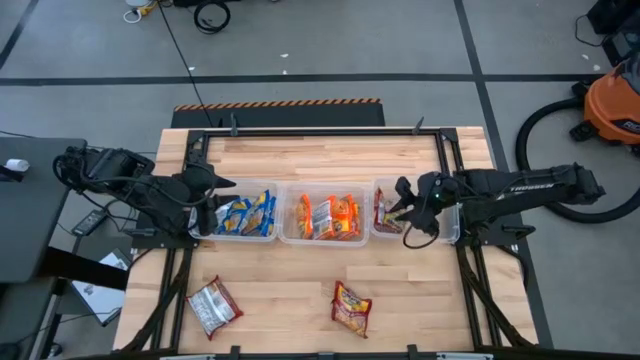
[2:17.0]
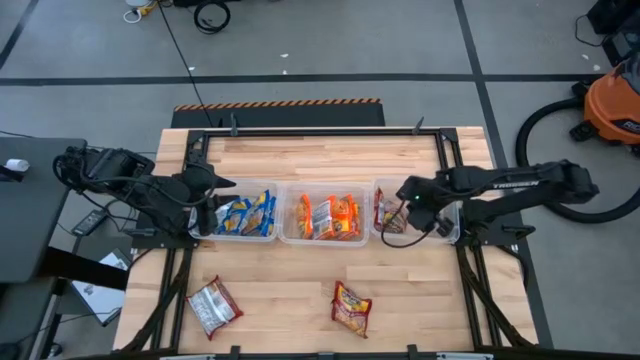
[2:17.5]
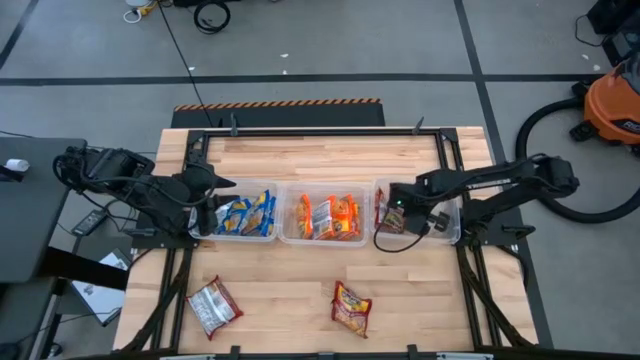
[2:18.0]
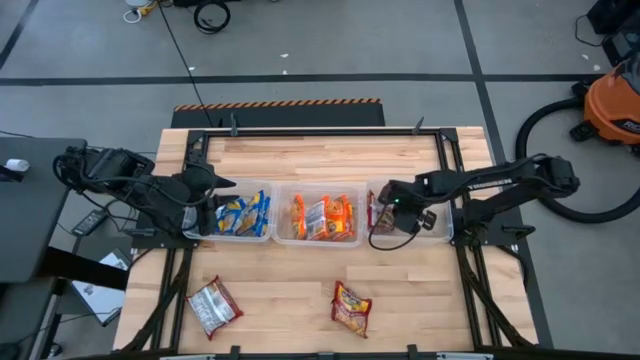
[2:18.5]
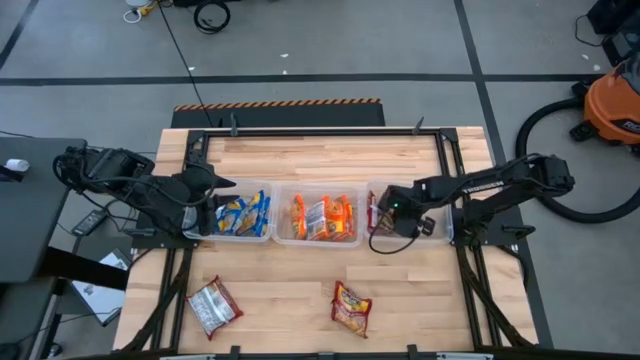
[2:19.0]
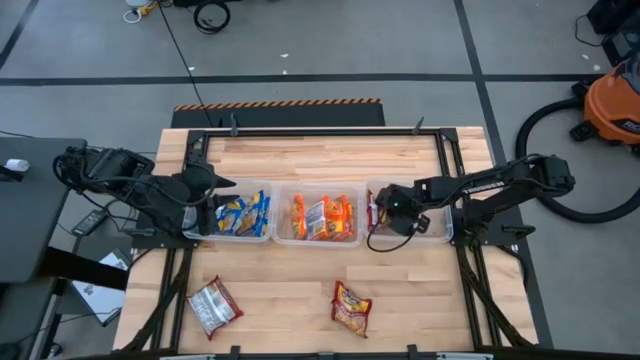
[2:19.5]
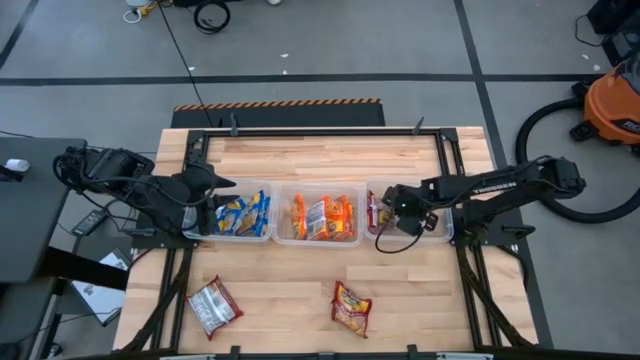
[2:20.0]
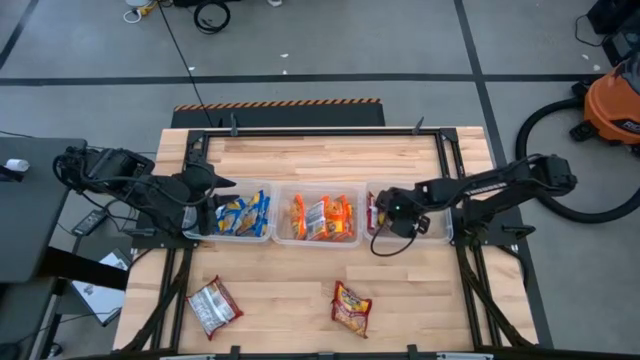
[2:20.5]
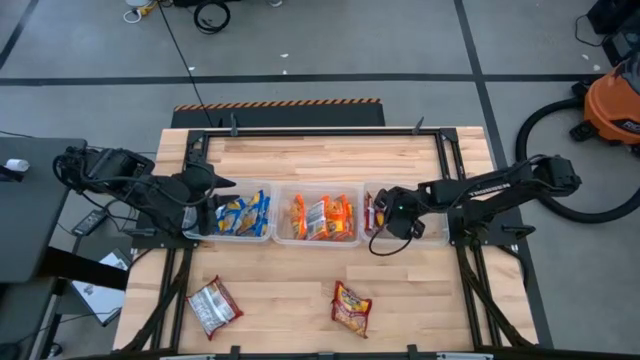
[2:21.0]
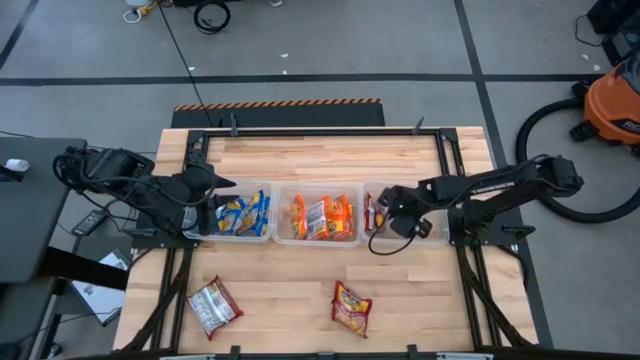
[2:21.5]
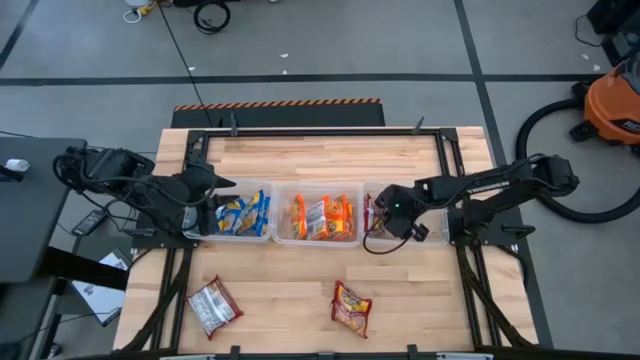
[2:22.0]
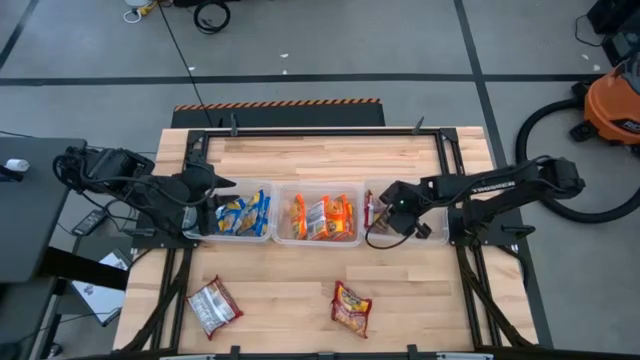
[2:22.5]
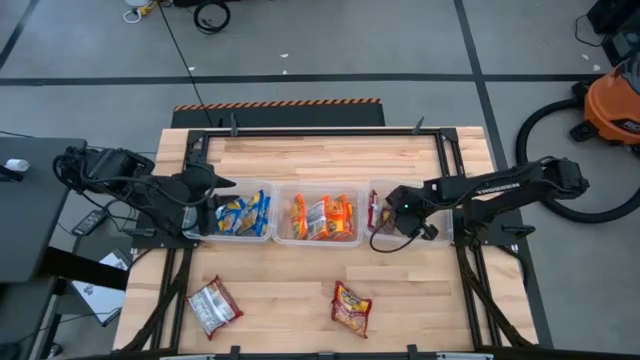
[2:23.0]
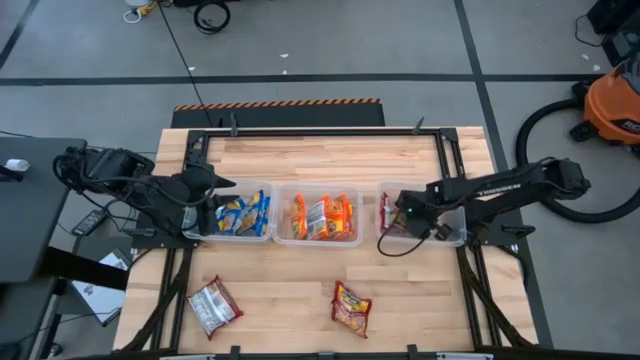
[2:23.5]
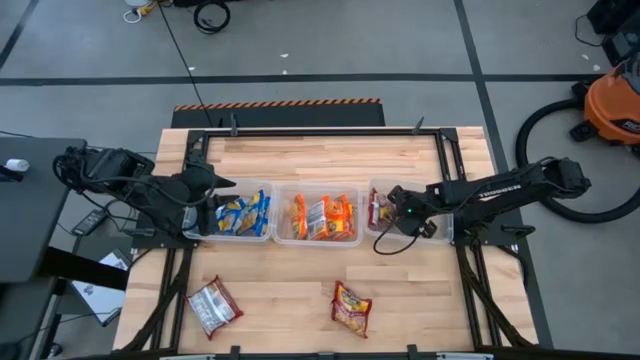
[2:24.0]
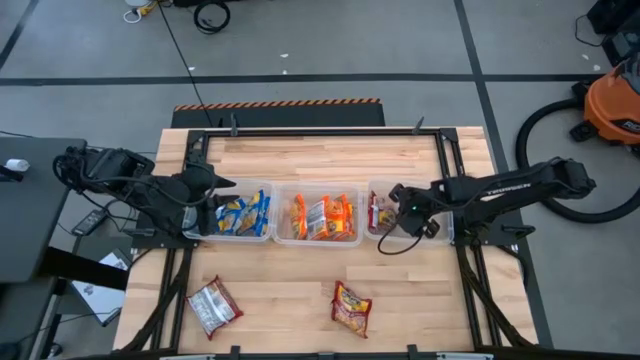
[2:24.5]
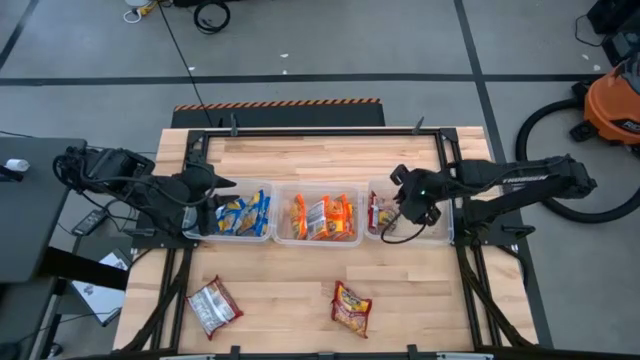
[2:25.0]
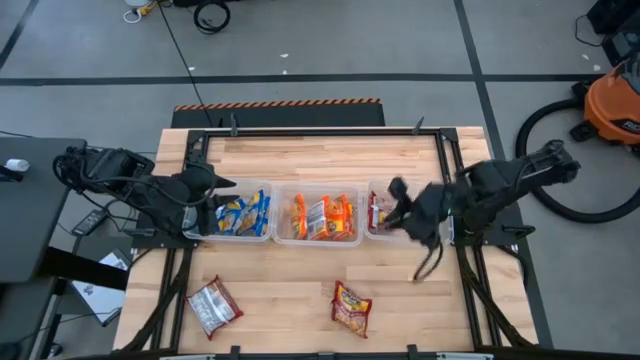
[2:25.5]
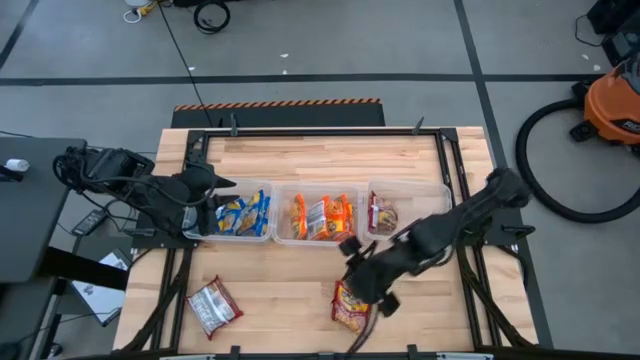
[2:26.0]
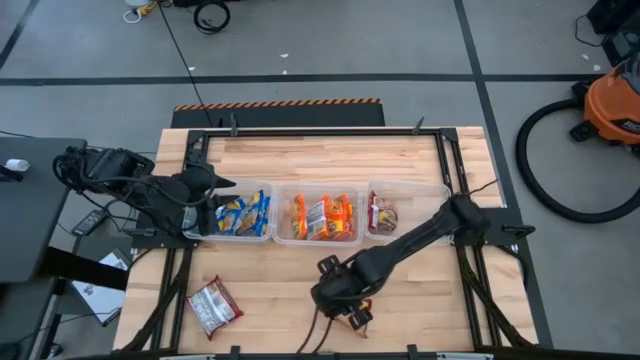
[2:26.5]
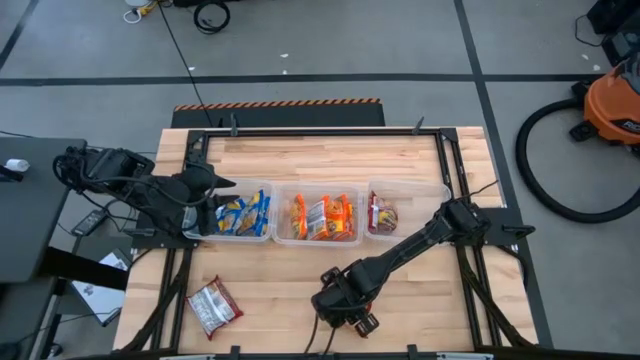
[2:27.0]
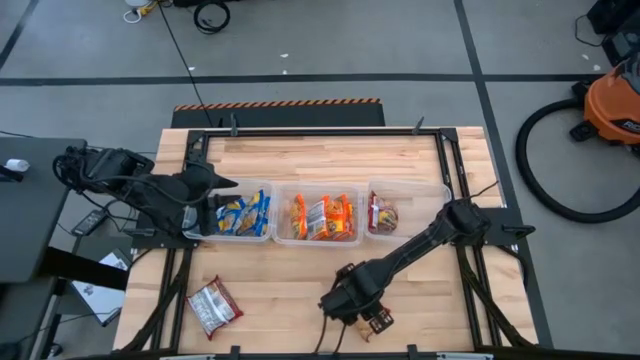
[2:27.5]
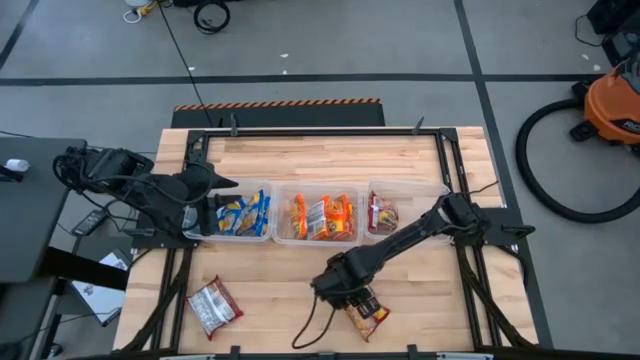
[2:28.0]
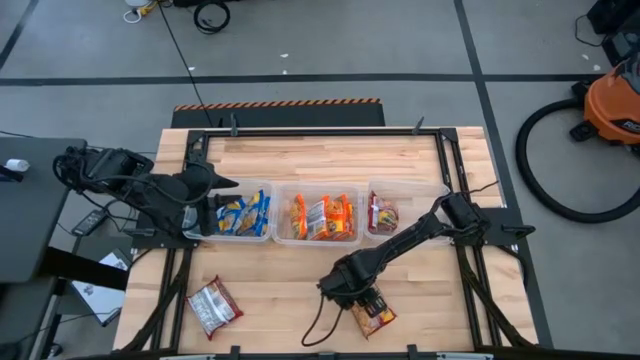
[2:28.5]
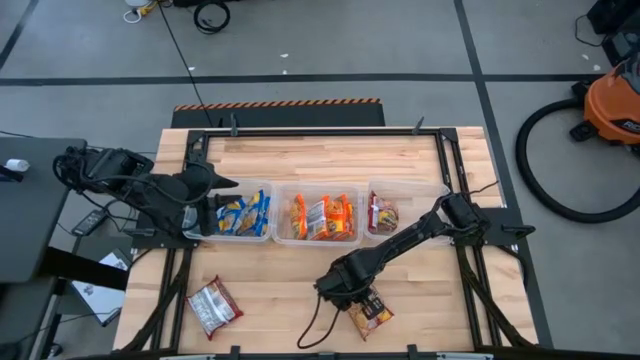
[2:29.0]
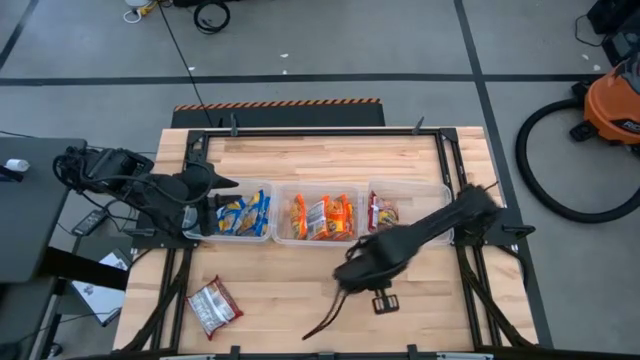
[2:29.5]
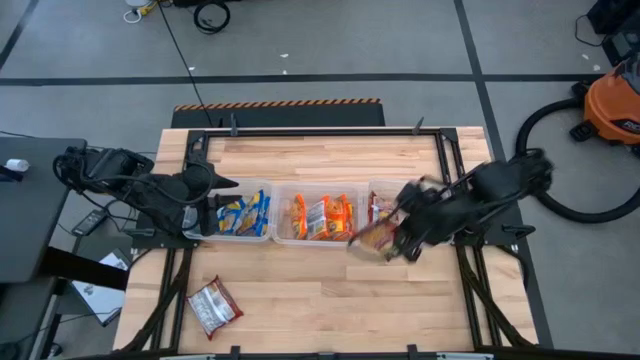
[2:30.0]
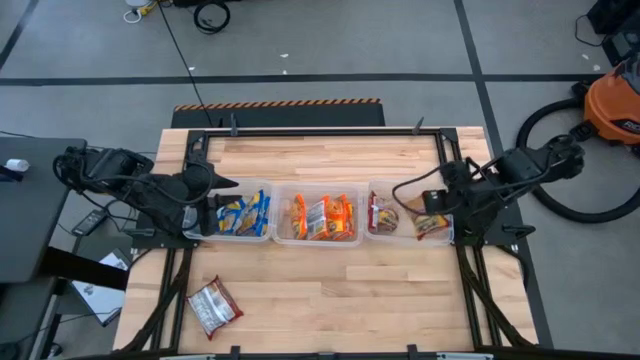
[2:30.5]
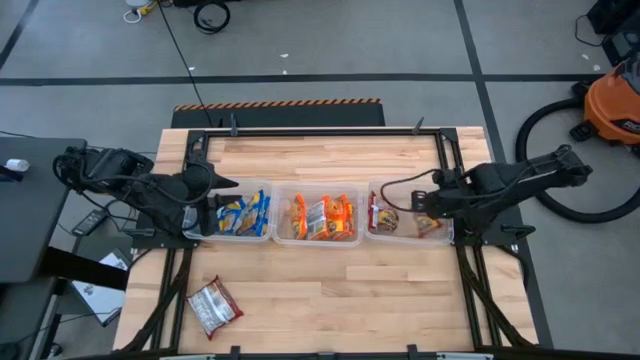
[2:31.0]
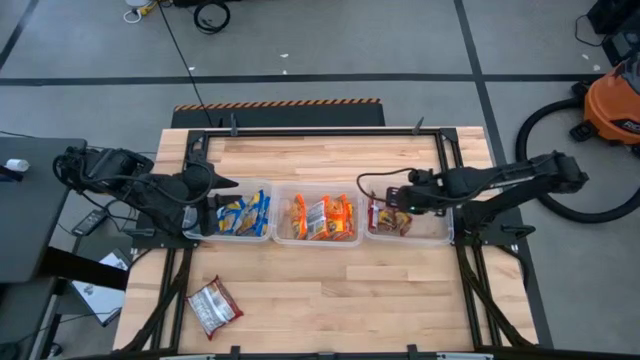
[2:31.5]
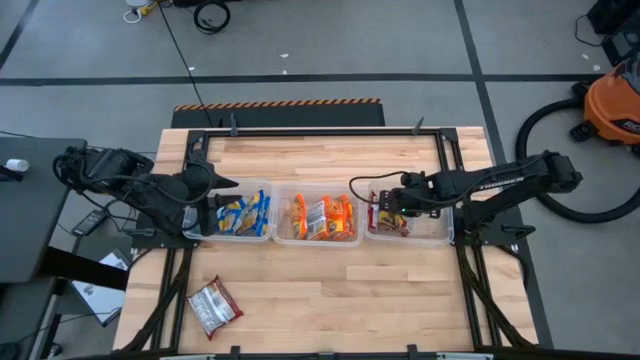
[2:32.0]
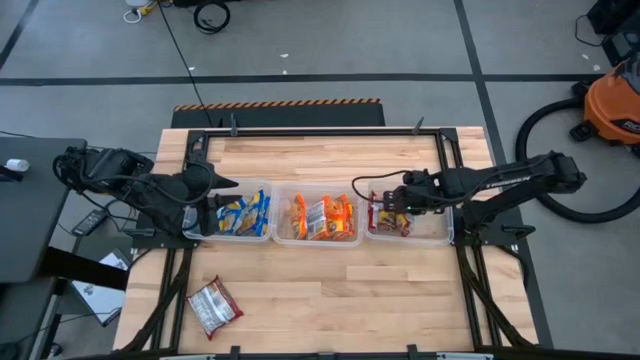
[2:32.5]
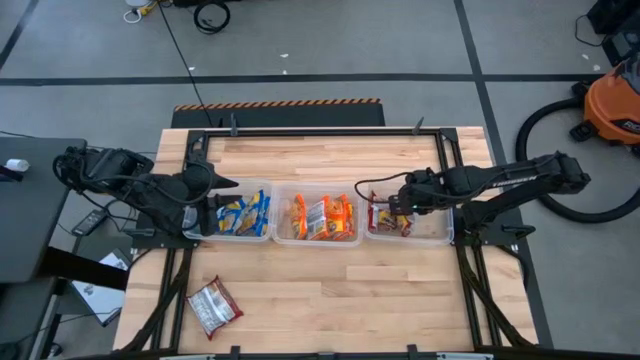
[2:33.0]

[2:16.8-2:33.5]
Task: Sort Maruchan noodles
Put the red noodle pack into the right transparent bin

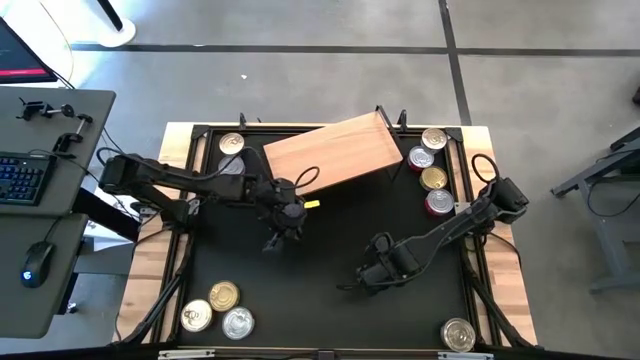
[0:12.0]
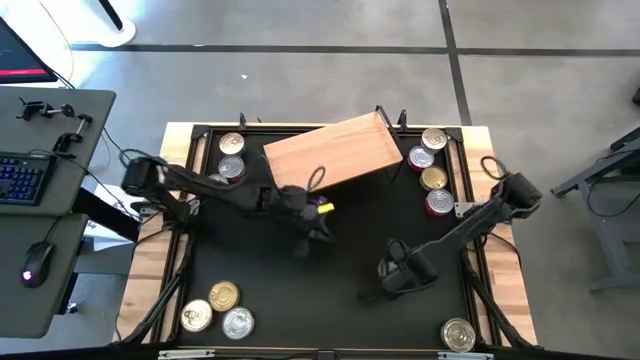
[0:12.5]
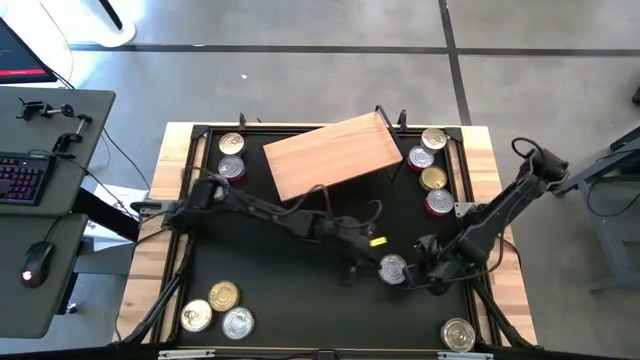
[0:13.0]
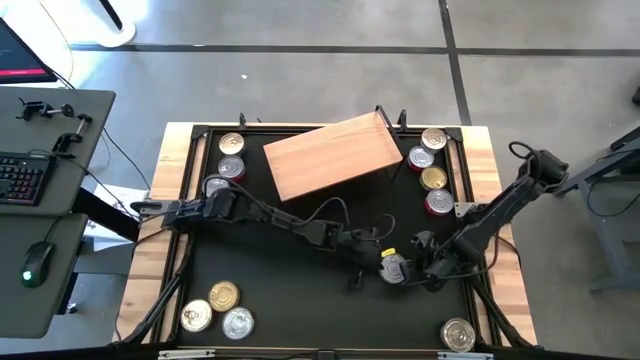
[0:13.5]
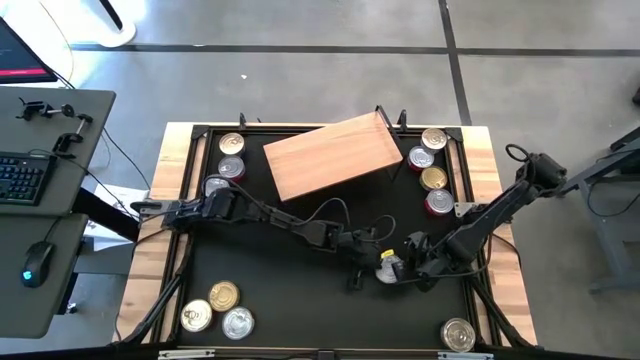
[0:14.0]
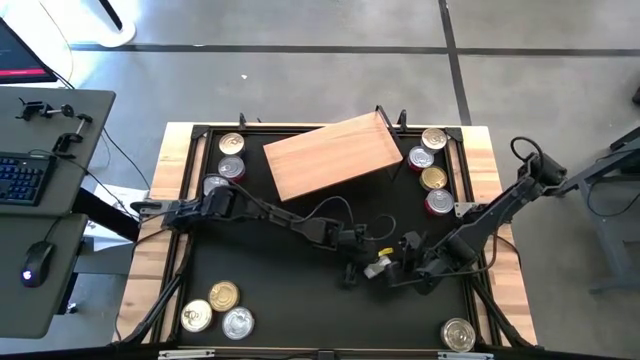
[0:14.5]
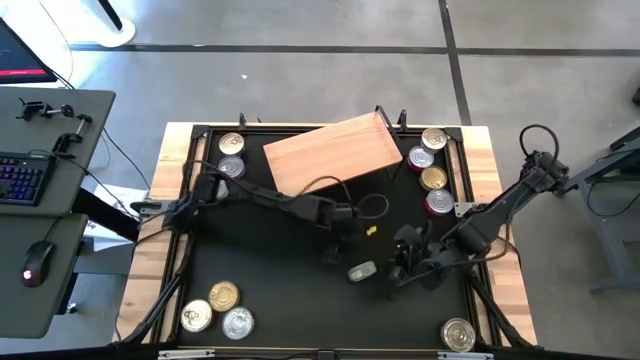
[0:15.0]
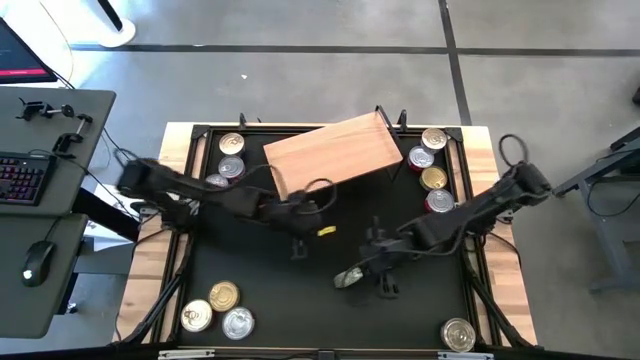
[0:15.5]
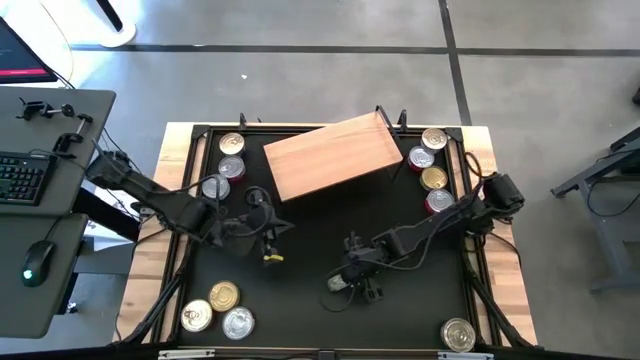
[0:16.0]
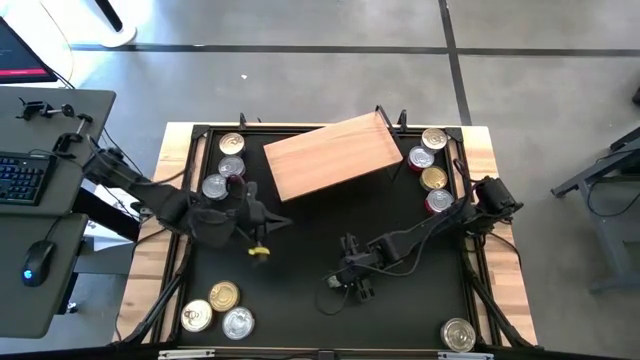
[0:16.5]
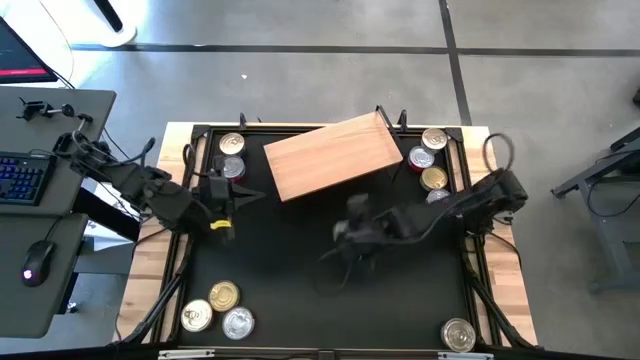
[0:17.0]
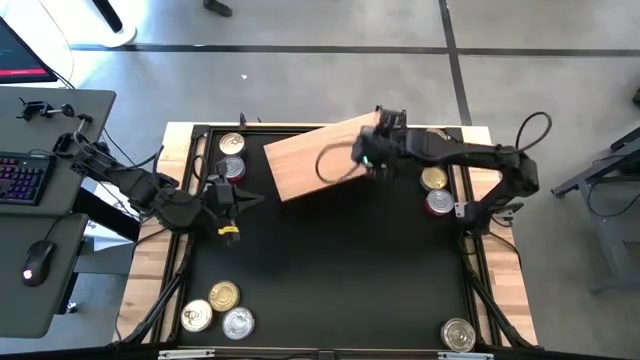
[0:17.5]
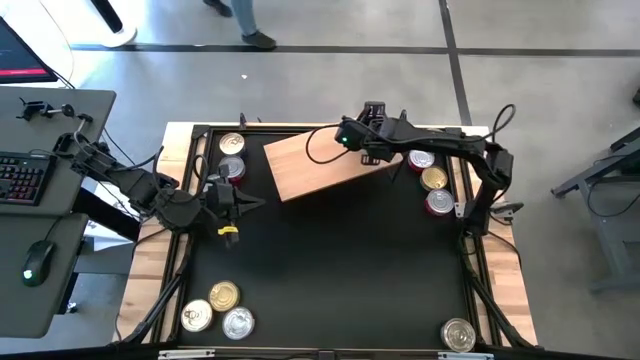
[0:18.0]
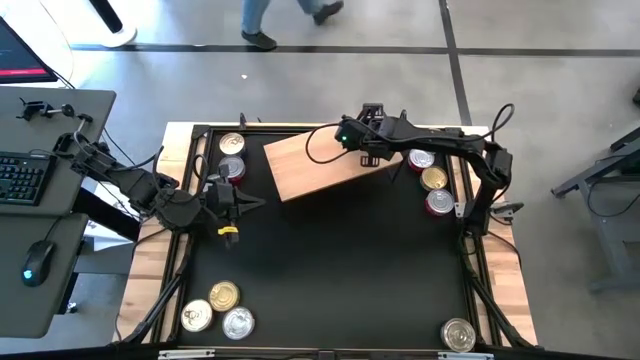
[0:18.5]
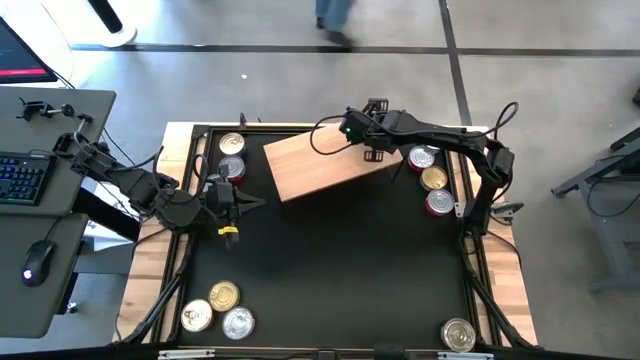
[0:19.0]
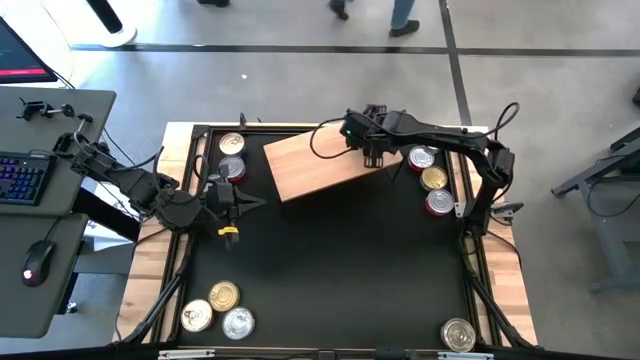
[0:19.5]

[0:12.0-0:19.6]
Task: Stack canned seafood by type on shelf
Put the bottom silver and green tuna can on the shelf
